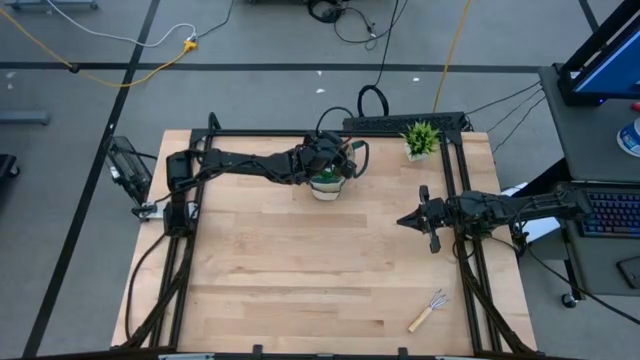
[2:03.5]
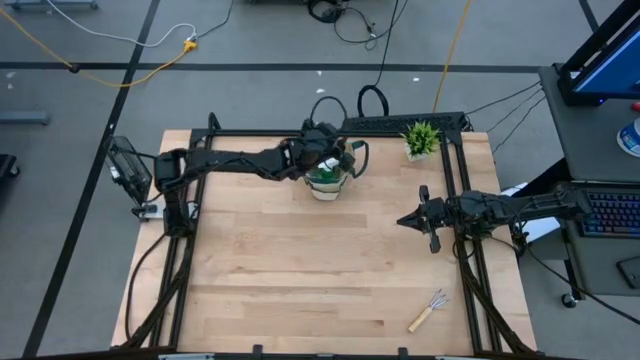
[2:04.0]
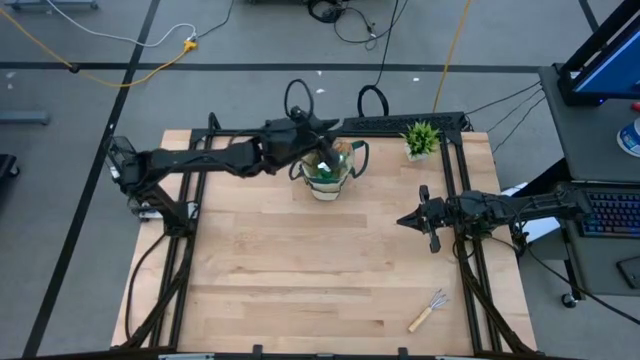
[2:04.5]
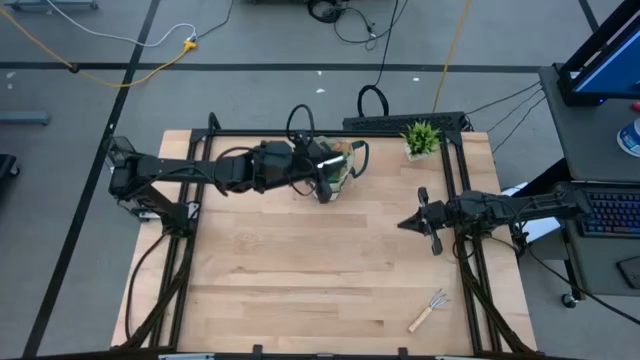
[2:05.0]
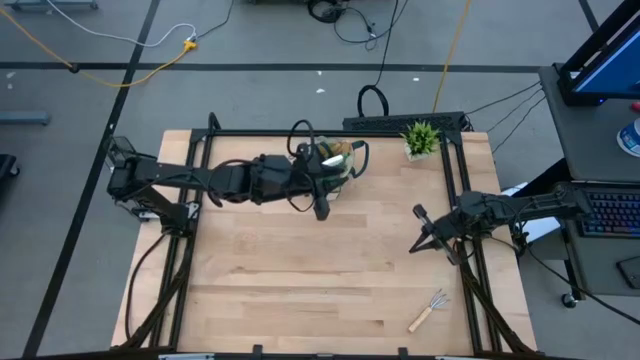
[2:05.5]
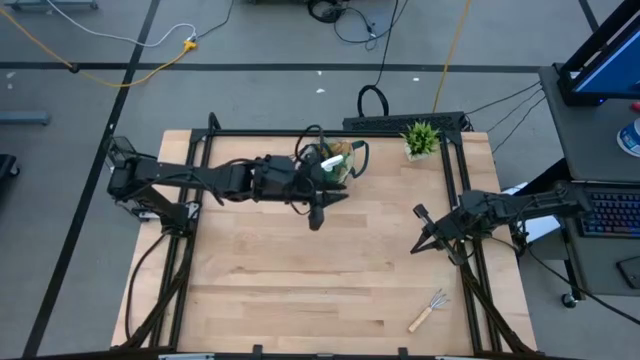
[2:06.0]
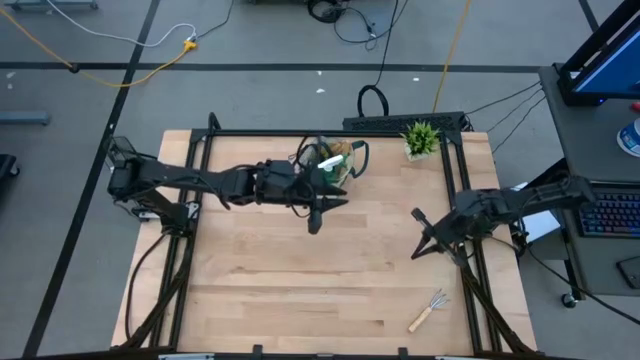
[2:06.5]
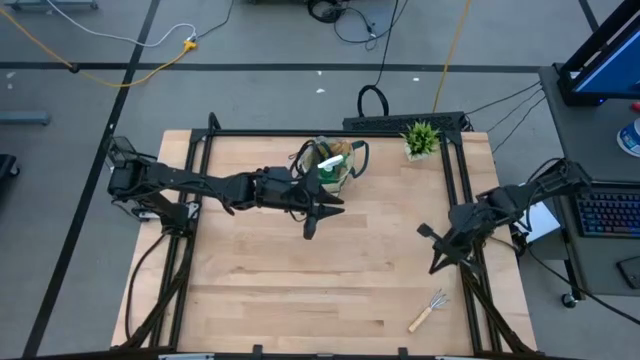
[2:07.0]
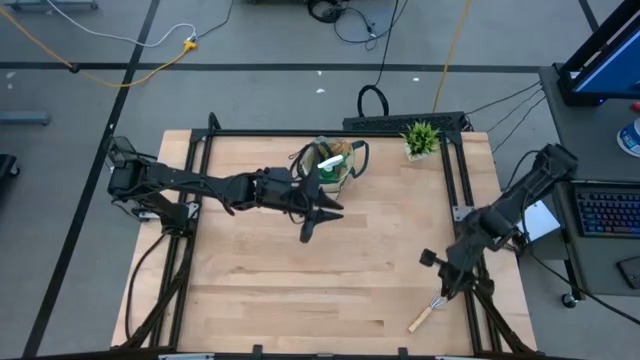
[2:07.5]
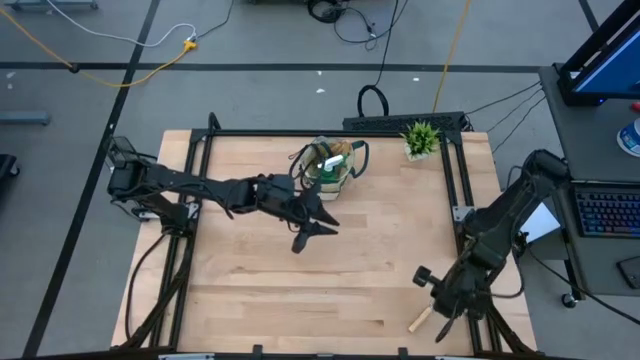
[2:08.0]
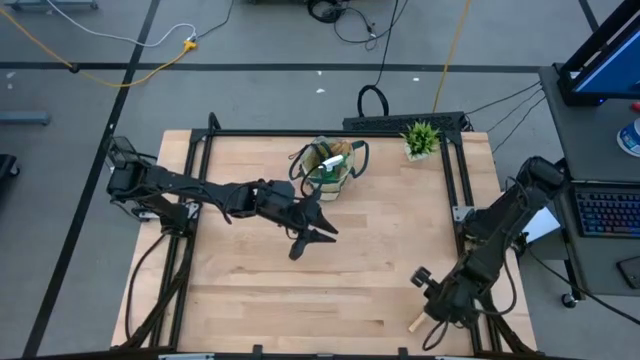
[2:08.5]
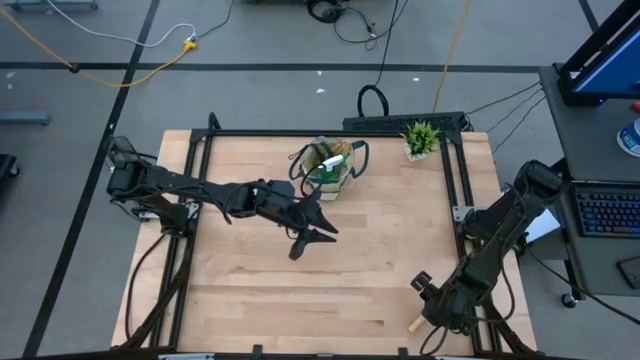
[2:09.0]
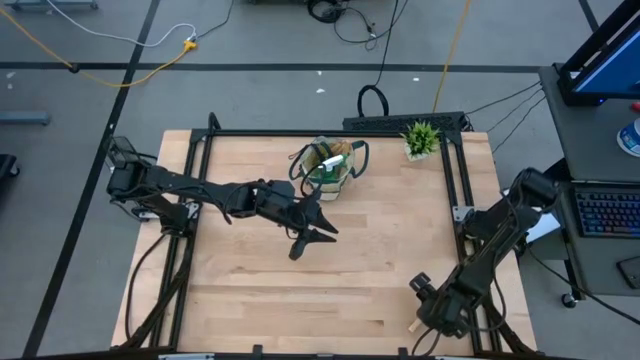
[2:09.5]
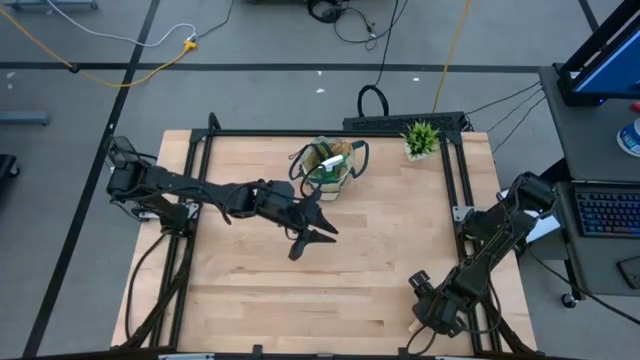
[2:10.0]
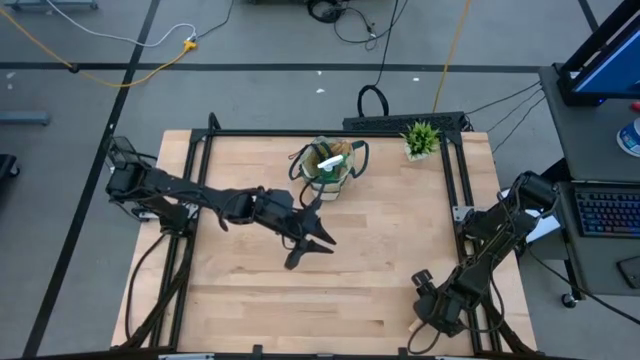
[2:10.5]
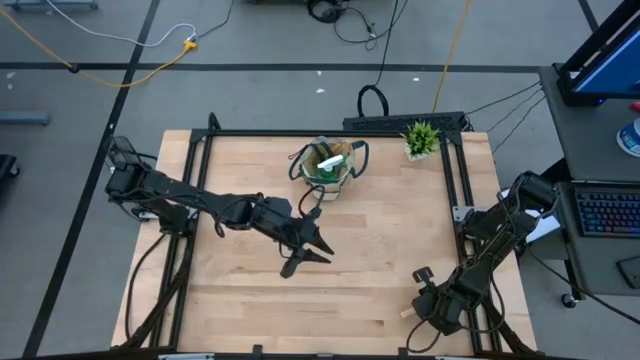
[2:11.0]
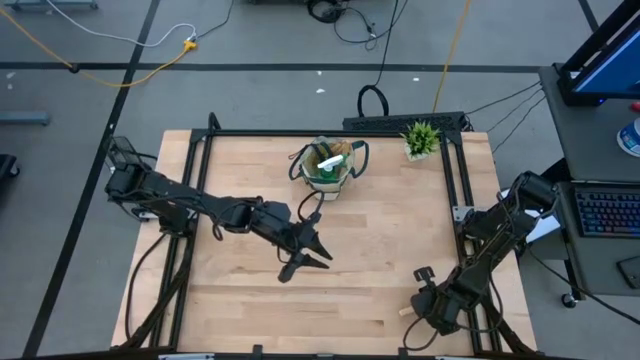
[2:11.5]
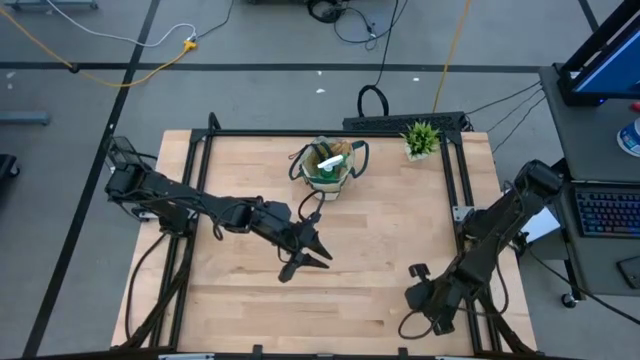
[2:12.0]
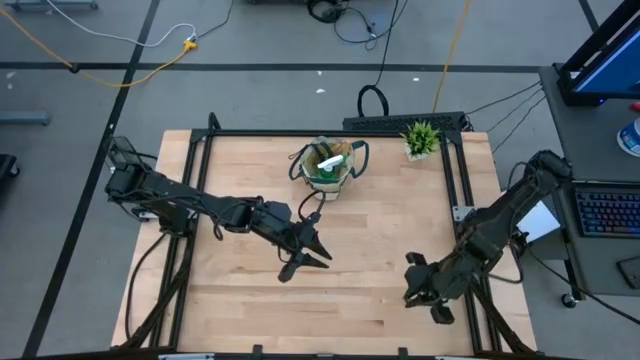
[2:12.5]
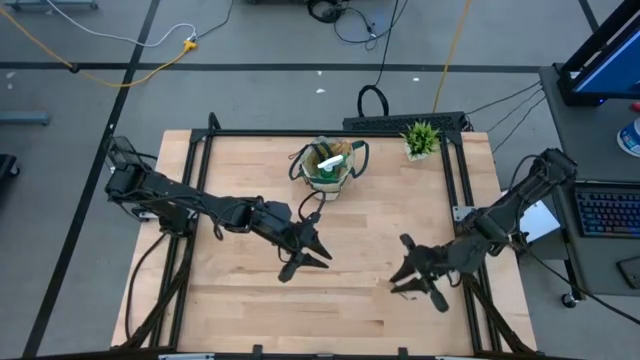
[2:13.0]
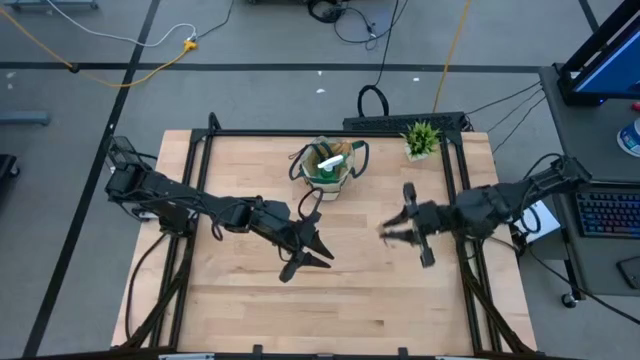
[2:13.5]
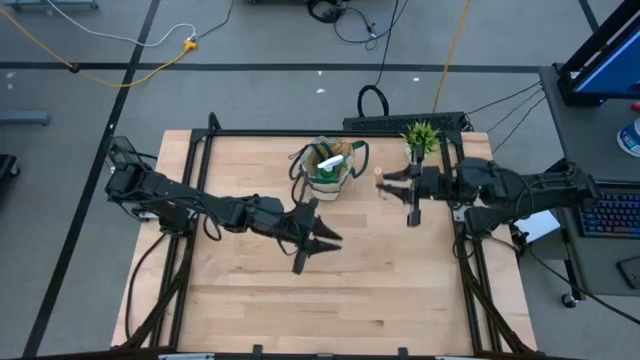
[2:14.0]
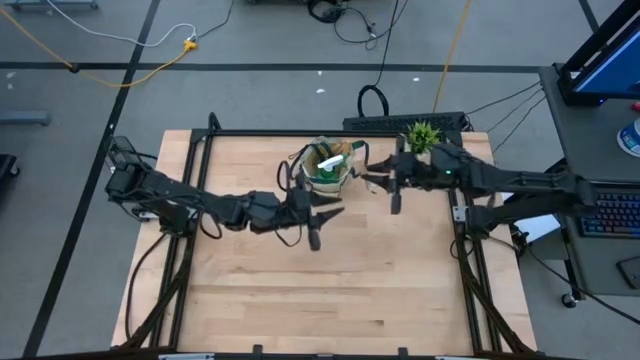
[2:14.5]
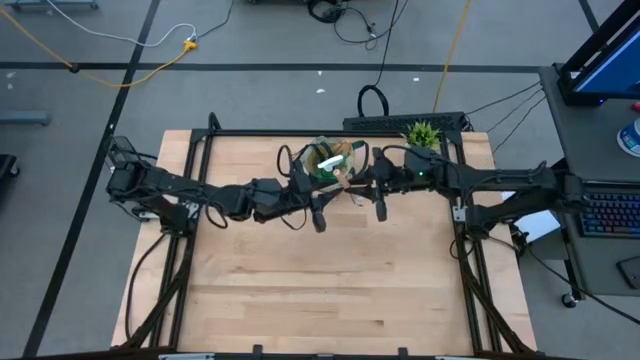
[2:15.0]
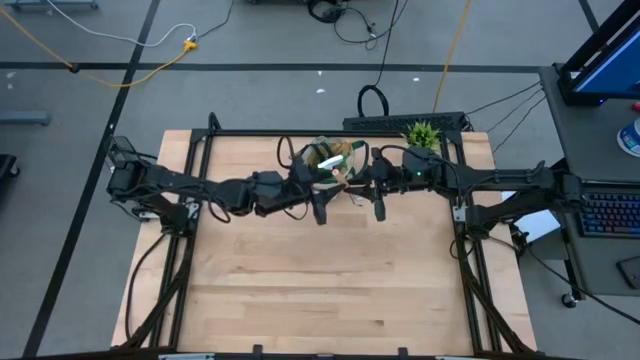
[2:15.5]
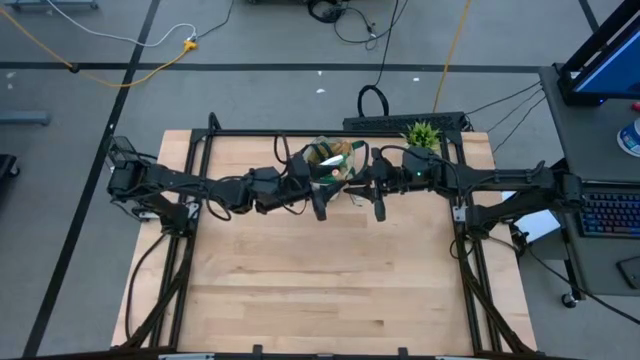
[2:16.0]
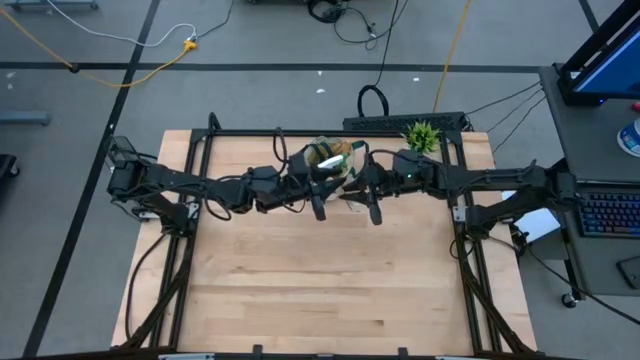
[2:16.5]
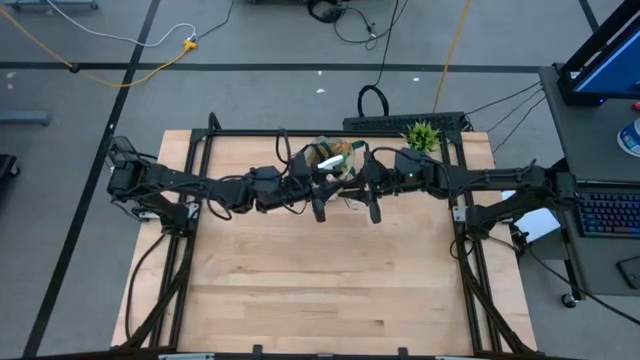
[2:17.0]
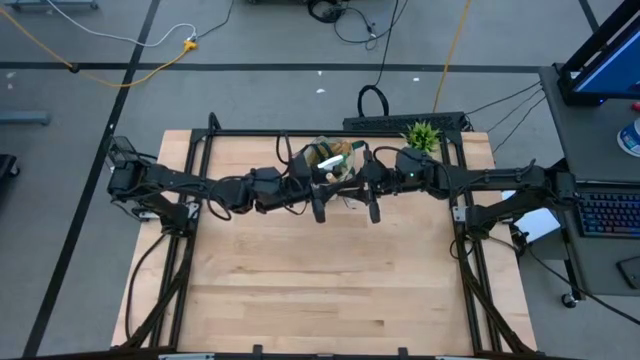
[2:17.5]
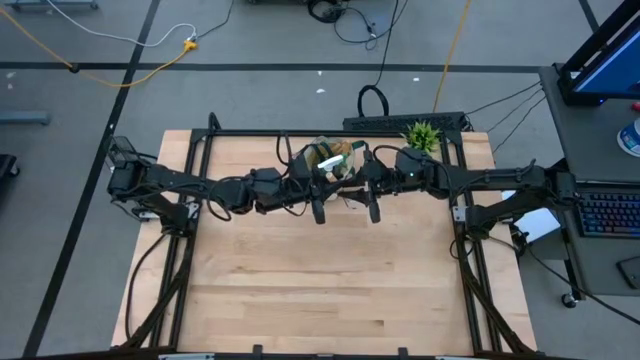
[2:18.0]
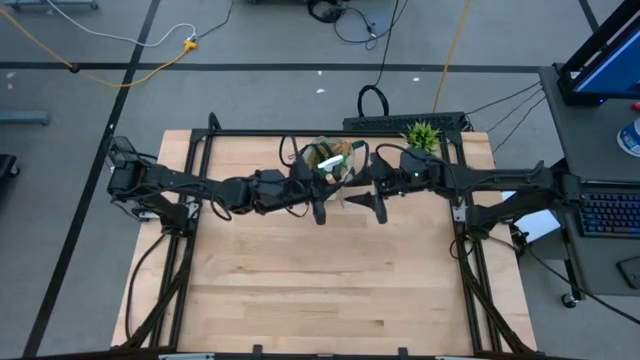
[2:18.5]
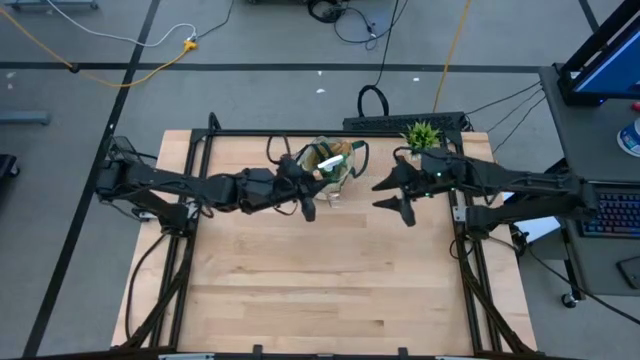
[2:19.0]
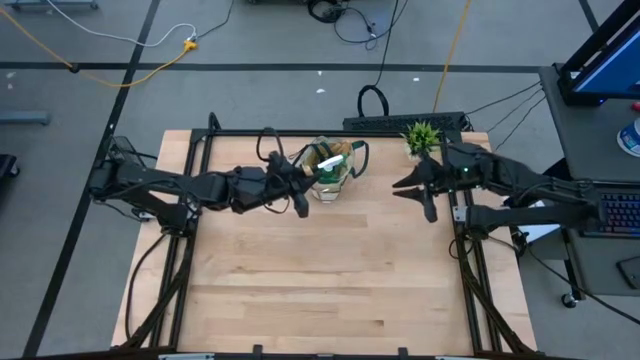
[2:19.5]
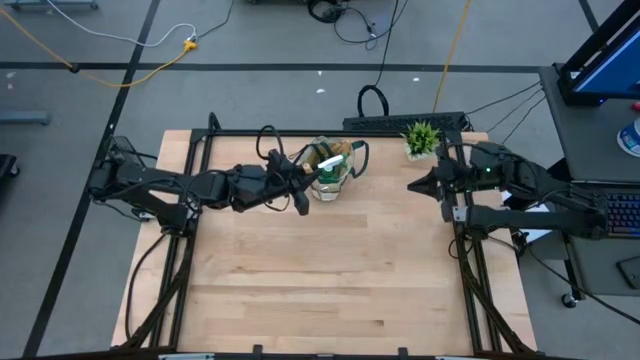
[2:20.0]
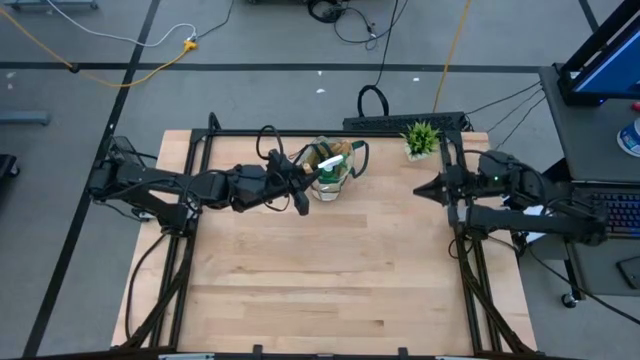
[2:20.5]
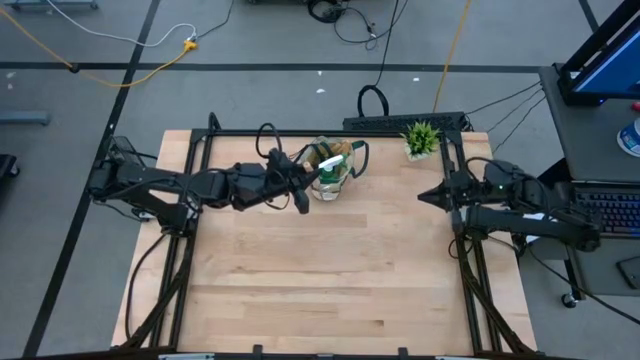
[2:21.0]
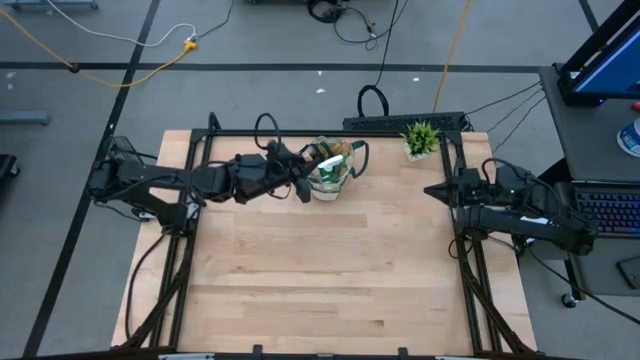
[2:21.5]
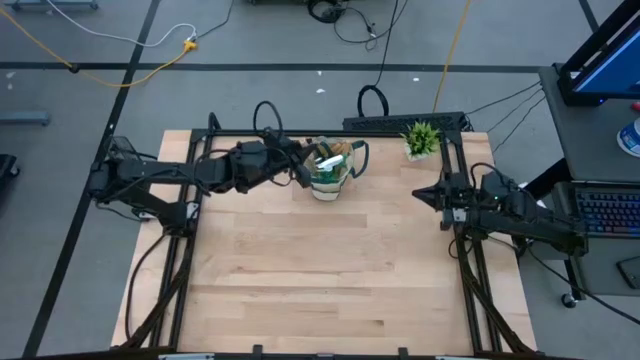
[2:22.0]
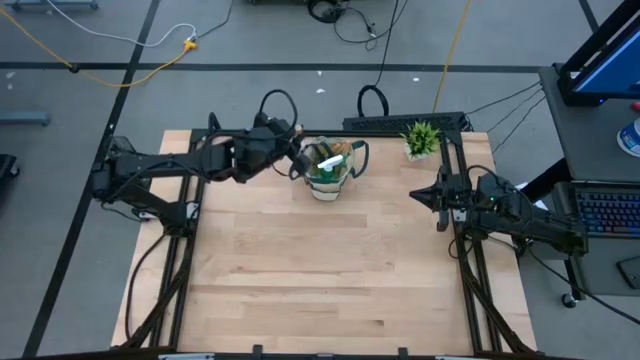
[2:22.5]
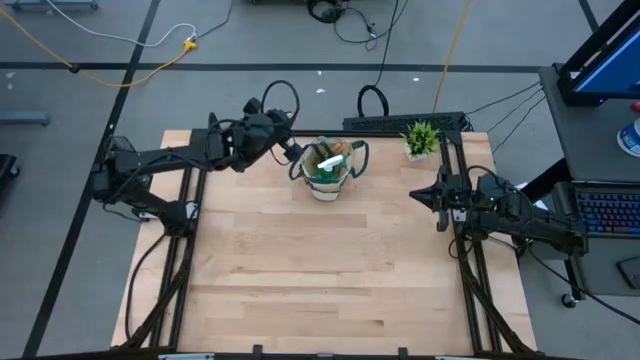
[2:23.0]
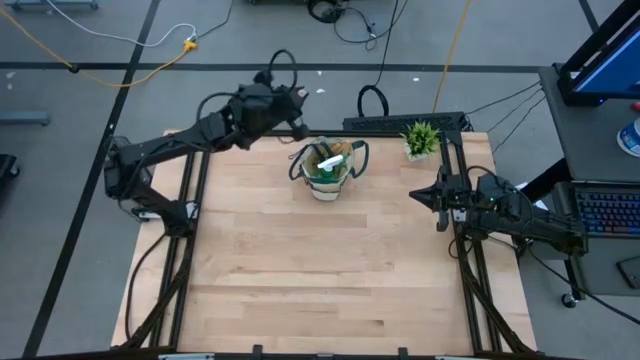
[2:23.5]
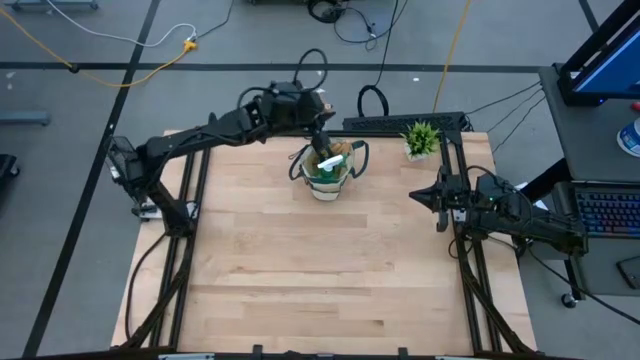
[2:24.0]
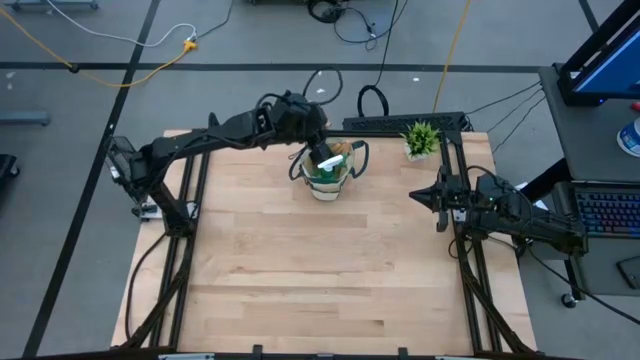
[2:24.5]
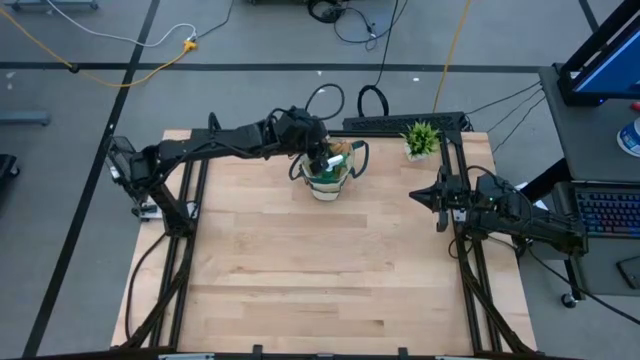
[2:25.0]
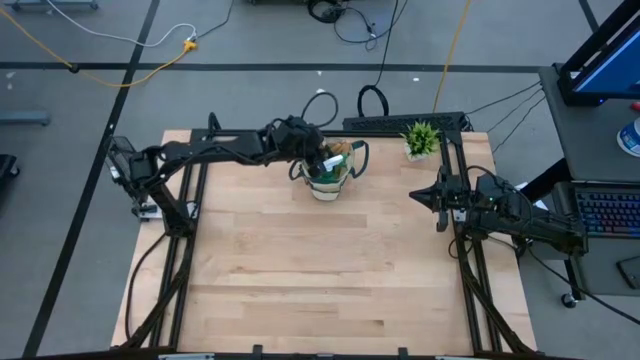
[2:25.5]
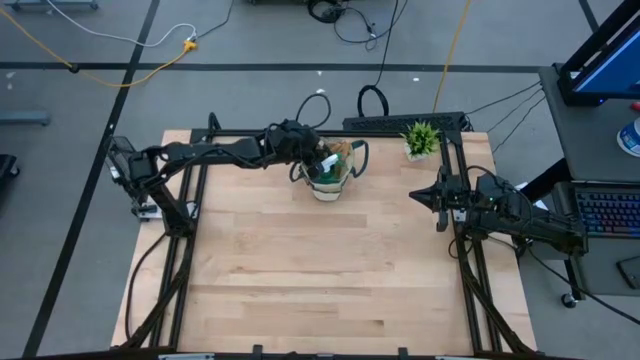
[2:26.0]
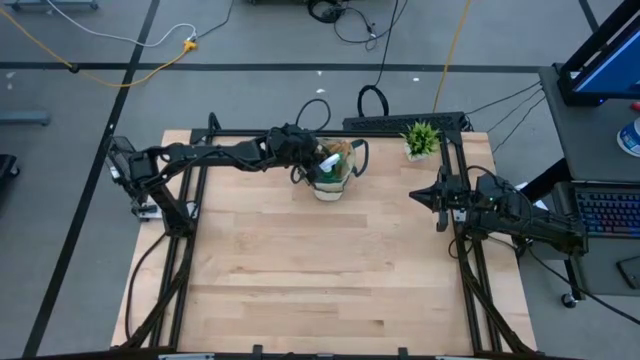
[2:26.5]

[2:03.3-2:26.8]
Task: Pick & Place Garden tools in Gardening bag
Put the brown hand rake into the gardening bag
